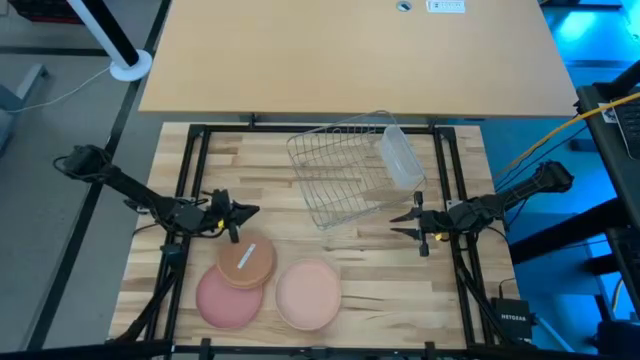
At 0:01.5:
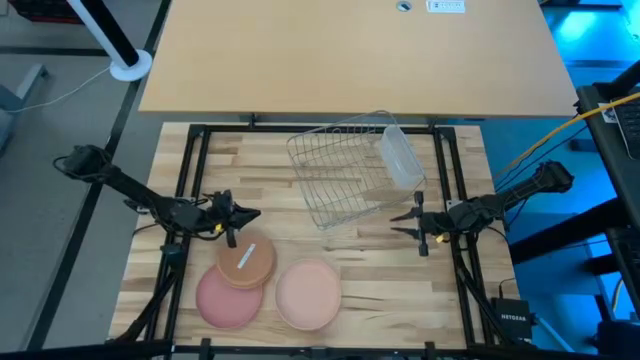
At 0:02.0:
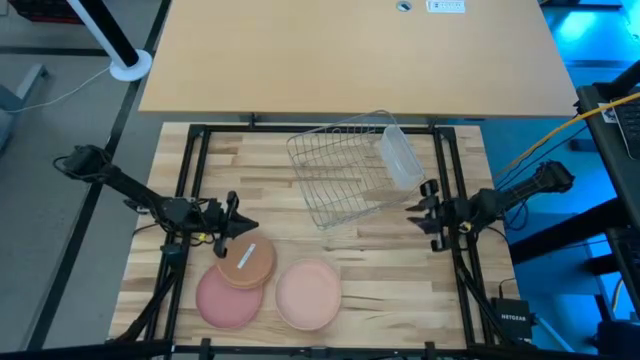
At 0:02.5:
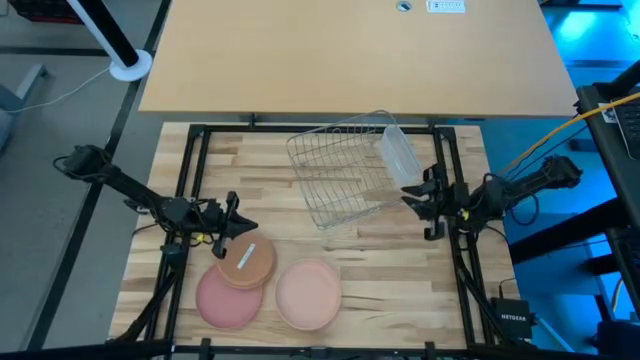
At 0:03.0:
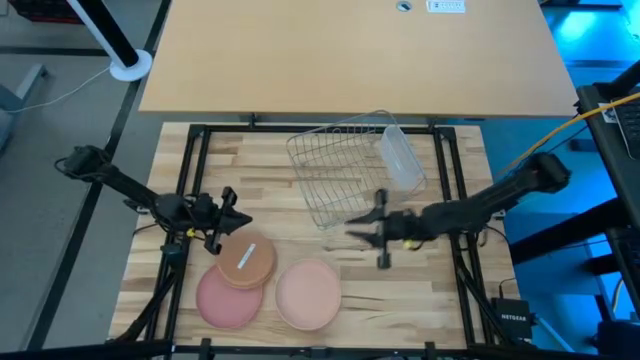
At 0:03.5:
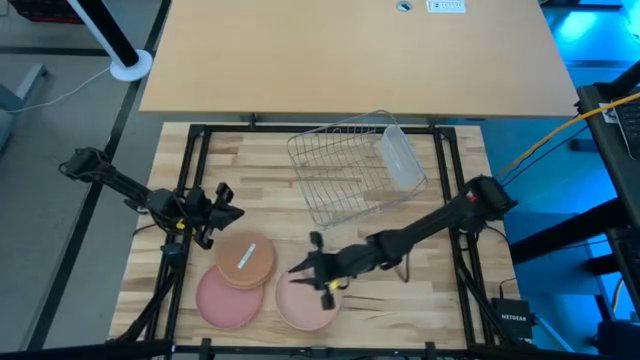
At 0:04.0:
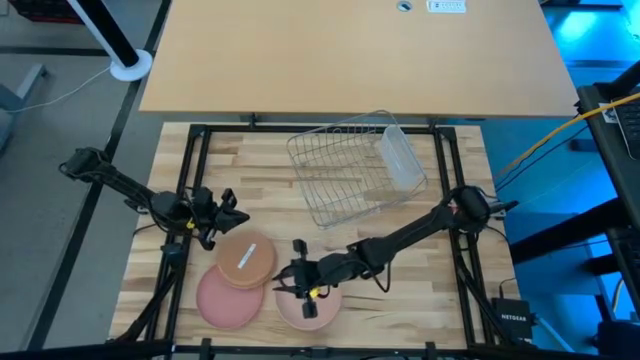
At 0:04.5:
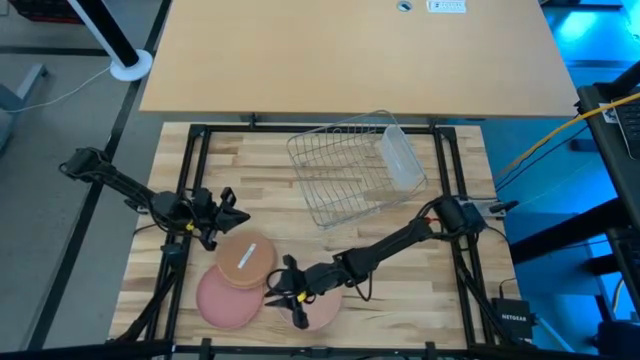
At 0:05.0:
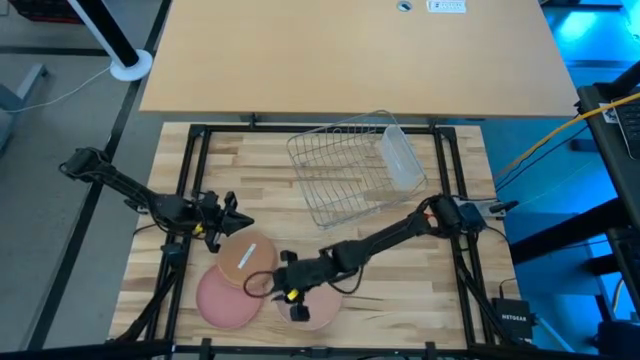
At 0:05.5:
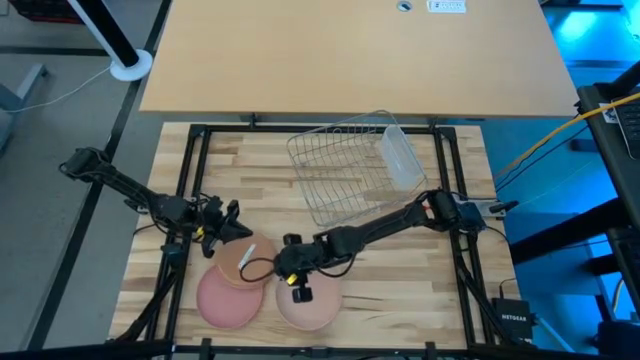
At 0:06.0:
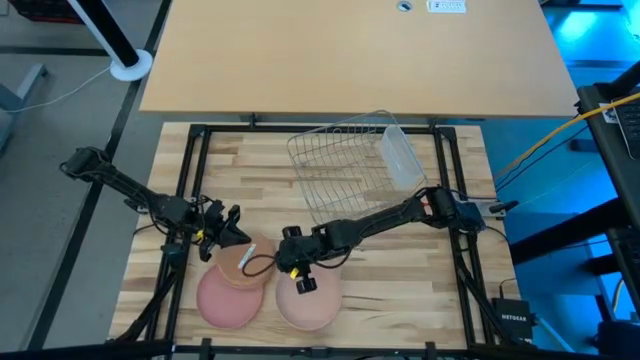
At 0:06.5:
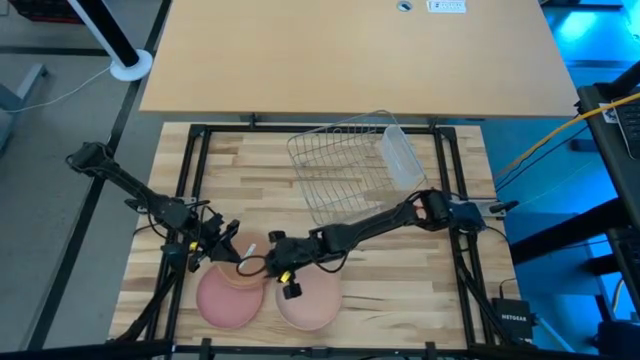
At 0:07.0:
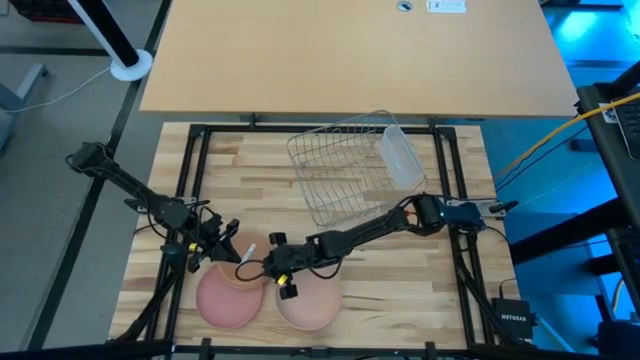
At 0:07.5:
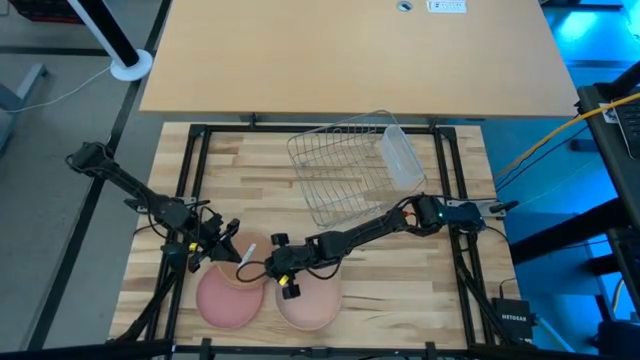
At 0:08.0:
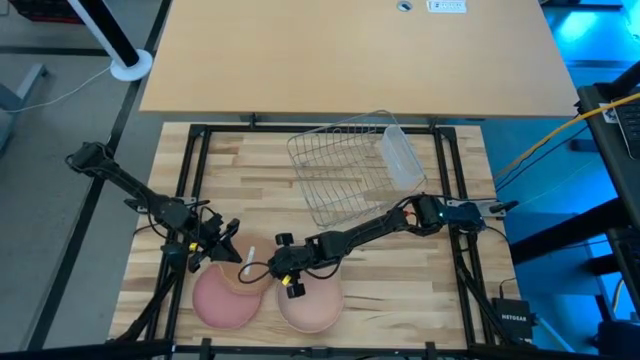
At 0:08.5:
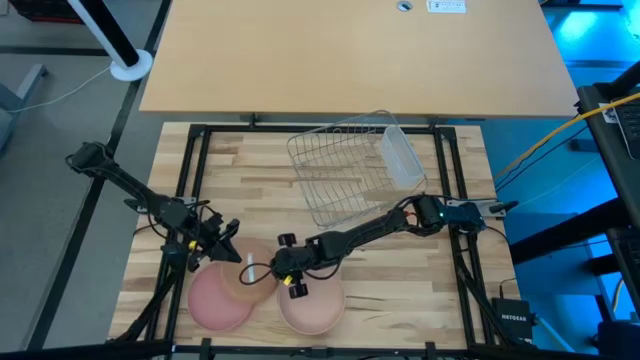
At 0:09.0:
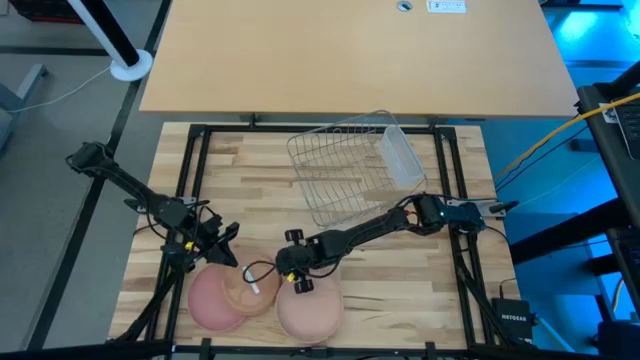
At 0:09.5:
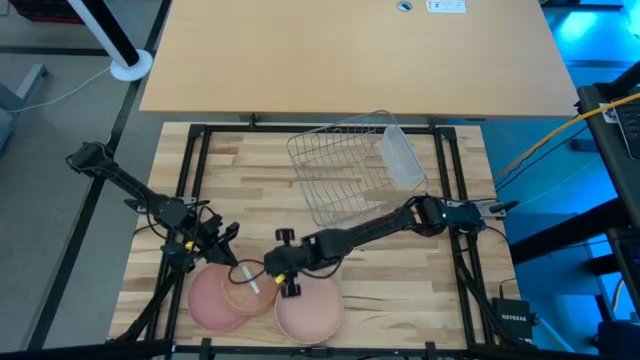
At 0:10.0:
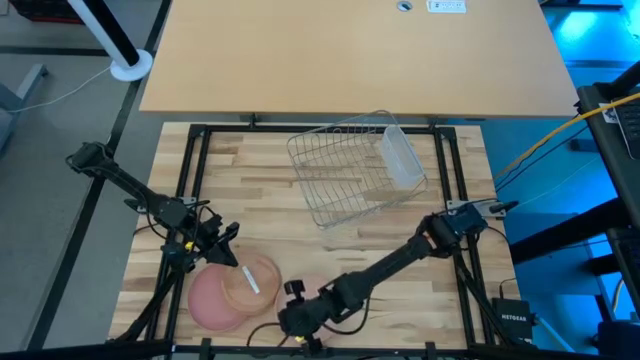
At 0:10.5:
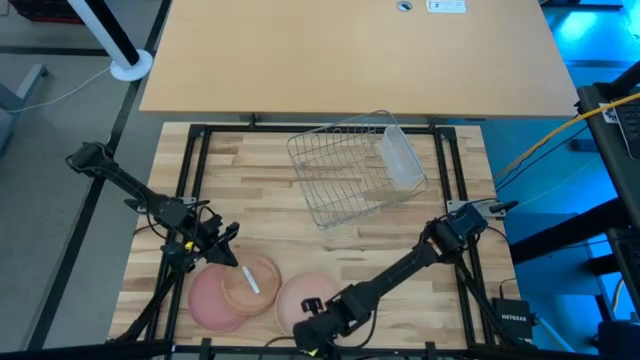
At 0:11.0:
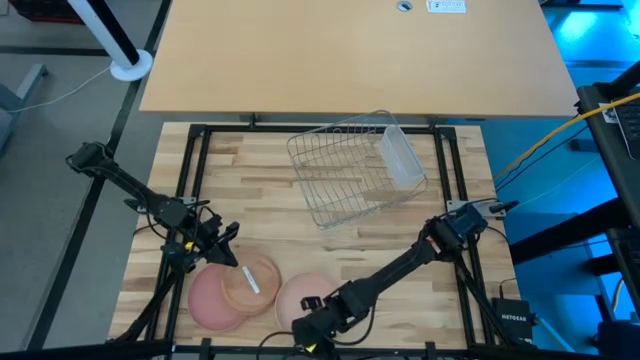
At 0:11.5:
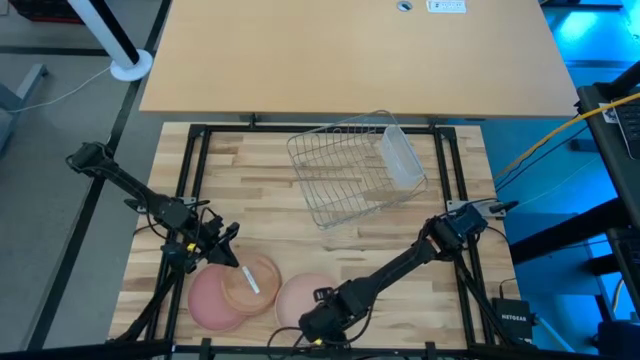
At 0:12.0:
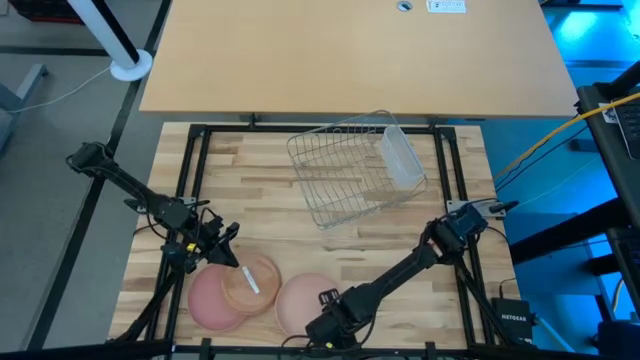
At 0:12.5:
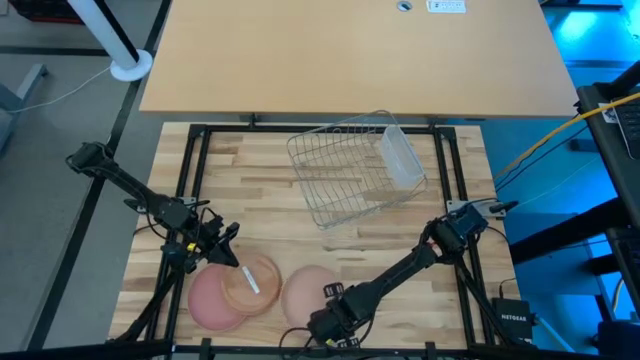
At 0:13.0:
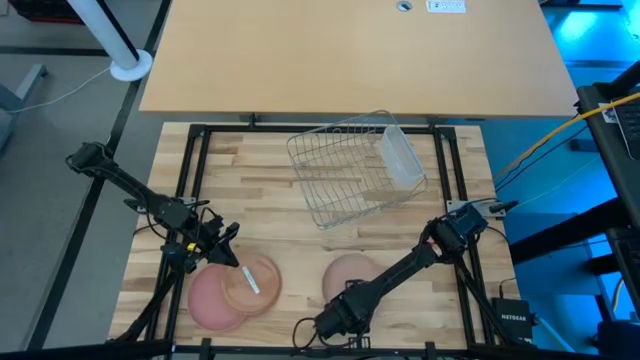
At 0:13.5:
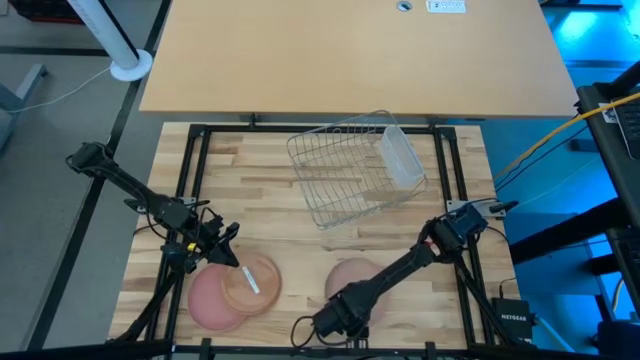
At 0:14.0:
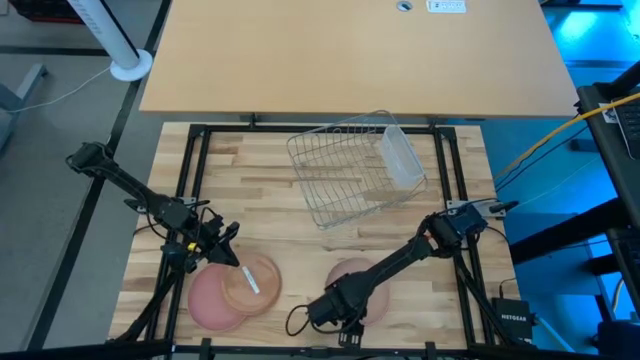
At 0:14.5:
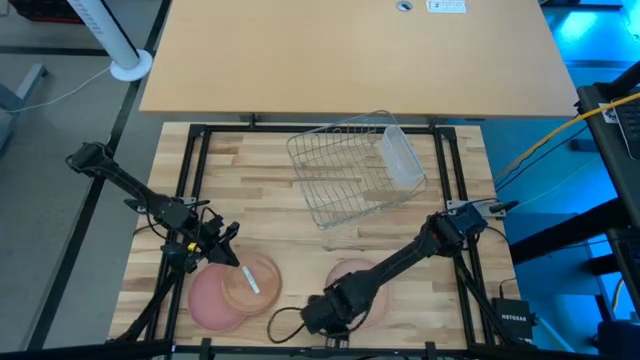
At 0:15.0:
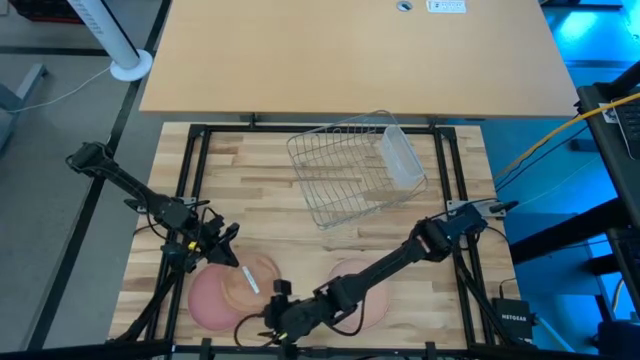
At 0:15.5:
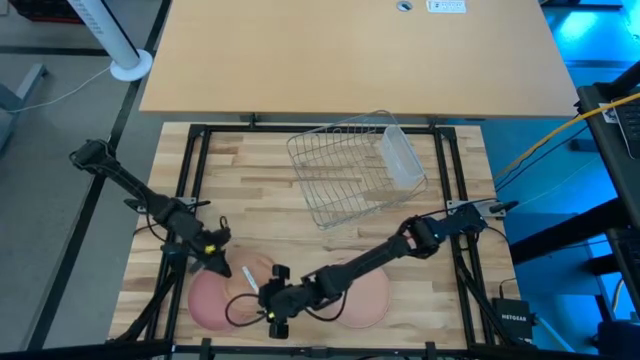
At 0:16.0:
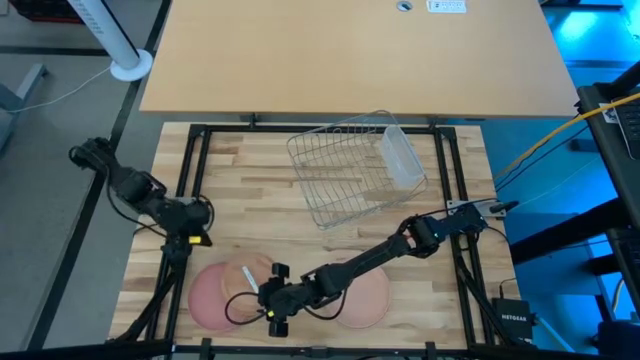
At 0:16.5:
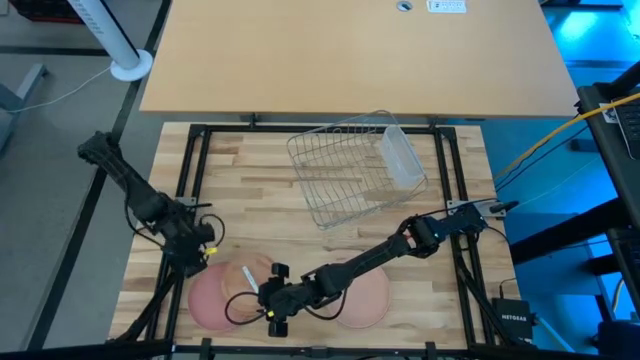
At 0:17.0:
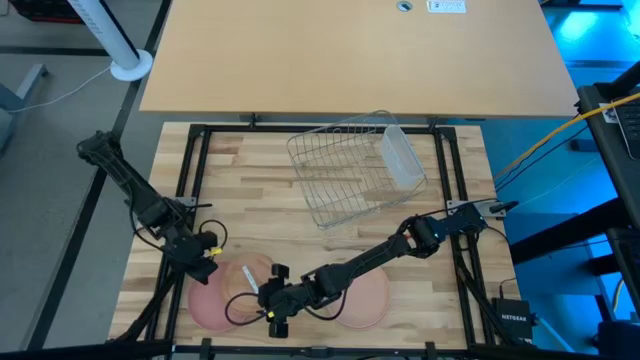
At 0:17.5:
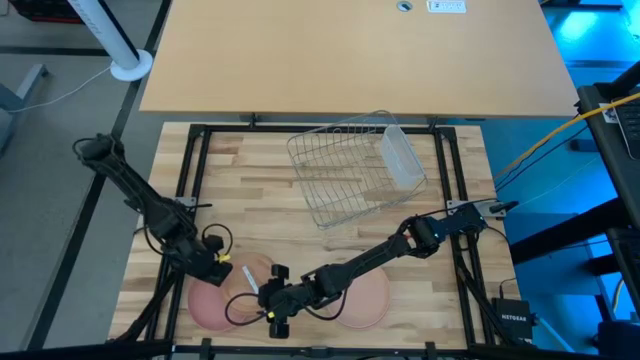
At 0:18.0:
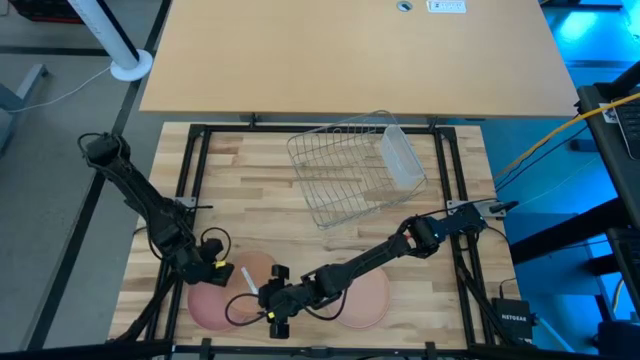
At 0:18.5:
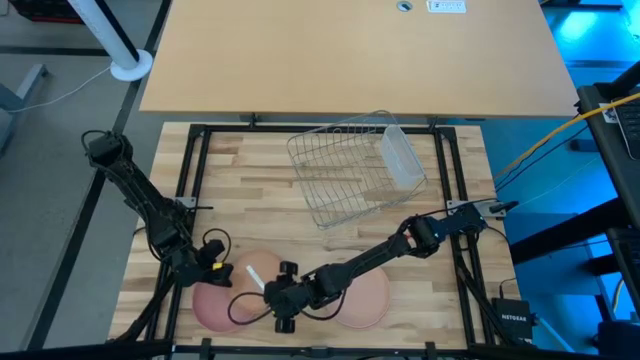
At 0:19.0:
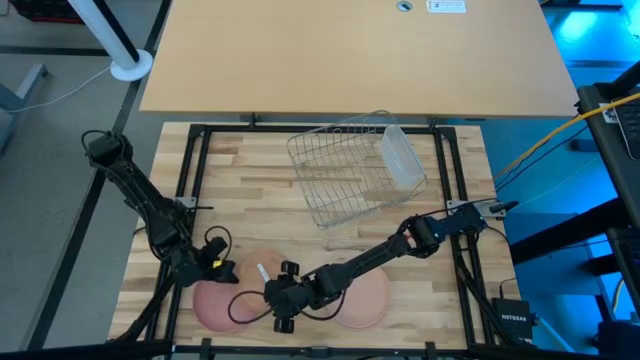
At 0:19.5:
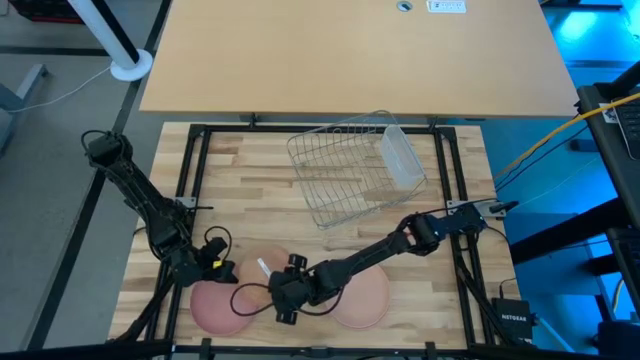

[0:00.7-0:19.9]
Task: Sort dishes
Put the brown plate into the dish rack
